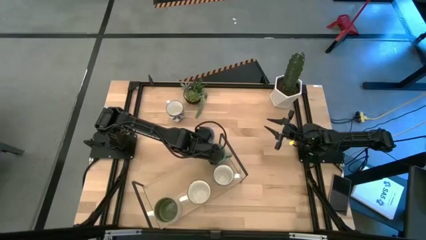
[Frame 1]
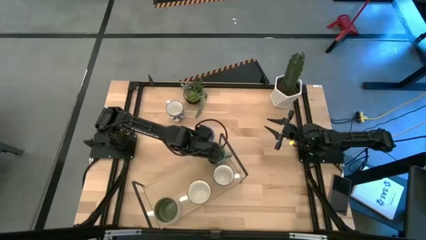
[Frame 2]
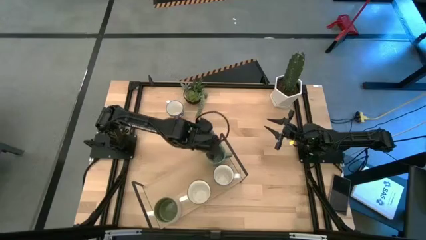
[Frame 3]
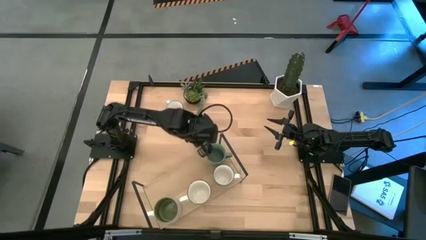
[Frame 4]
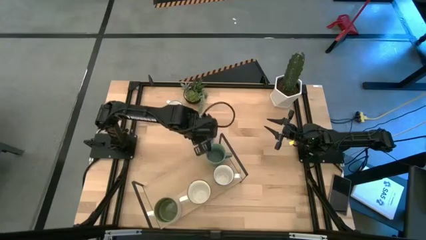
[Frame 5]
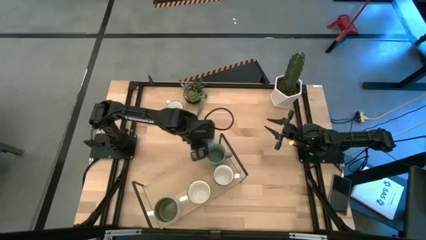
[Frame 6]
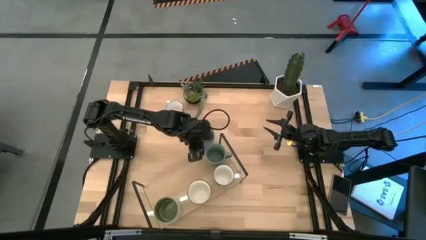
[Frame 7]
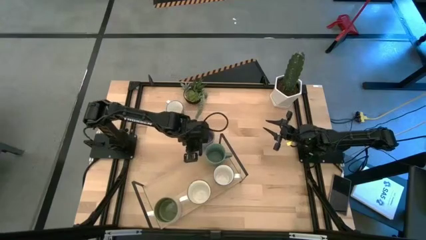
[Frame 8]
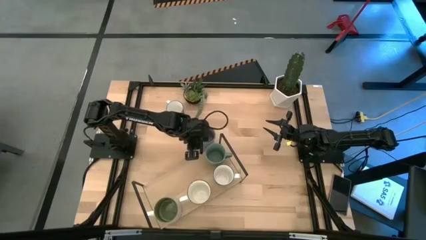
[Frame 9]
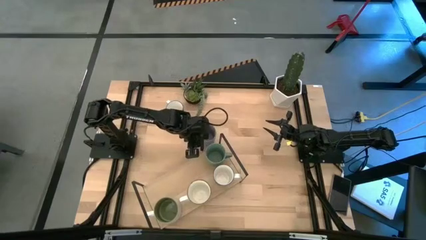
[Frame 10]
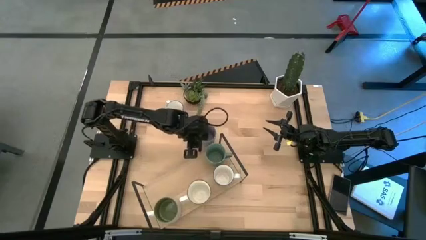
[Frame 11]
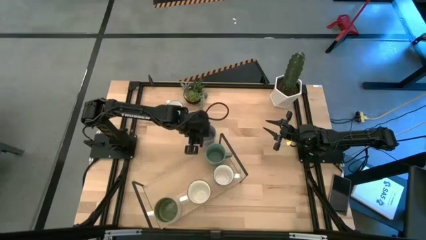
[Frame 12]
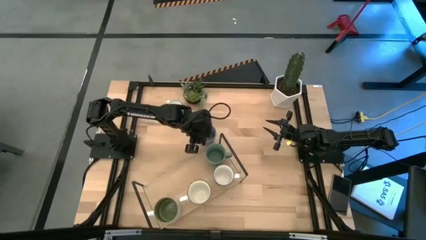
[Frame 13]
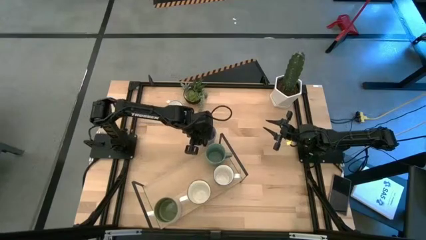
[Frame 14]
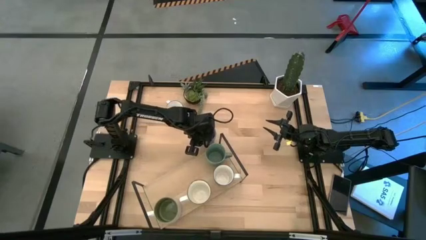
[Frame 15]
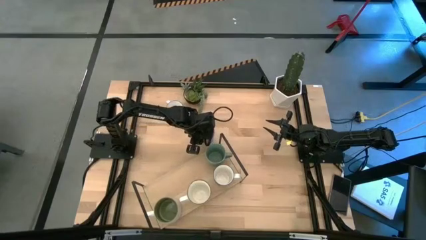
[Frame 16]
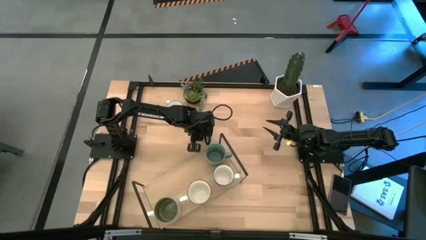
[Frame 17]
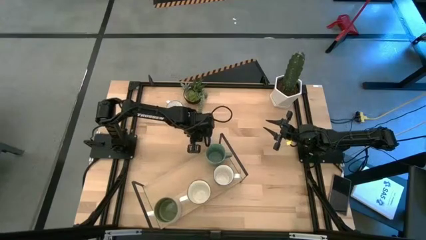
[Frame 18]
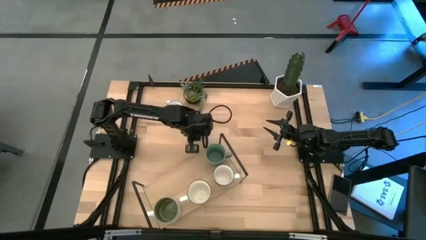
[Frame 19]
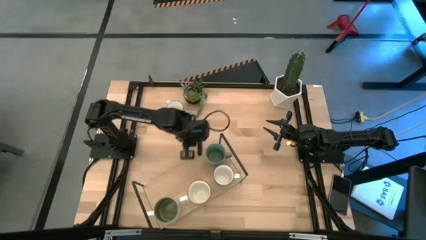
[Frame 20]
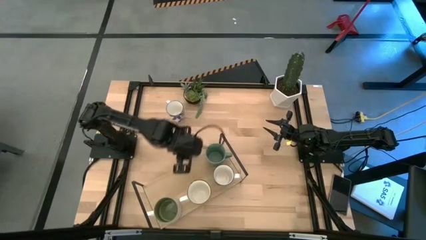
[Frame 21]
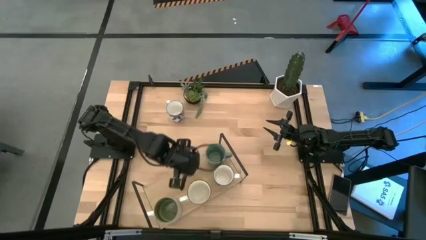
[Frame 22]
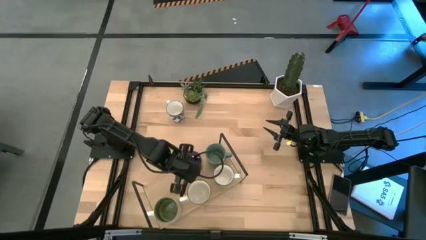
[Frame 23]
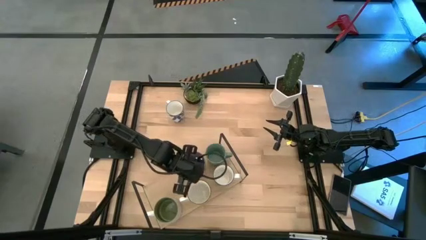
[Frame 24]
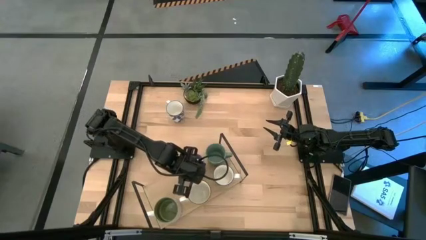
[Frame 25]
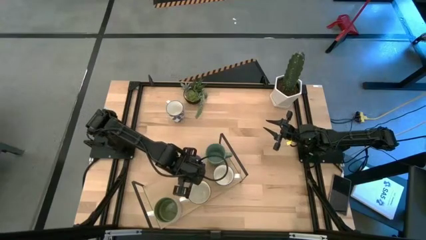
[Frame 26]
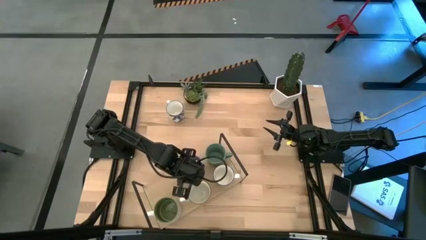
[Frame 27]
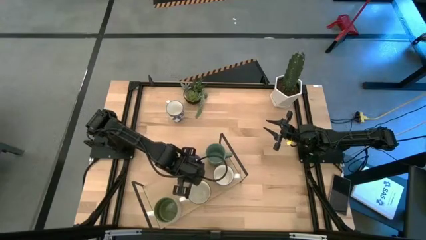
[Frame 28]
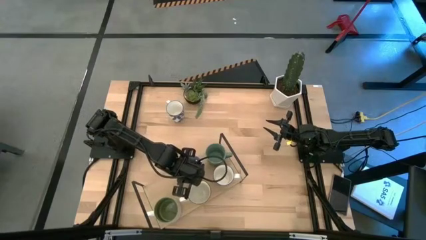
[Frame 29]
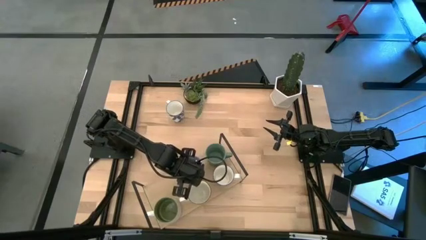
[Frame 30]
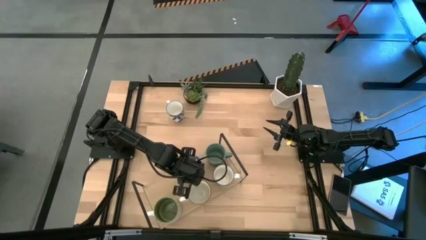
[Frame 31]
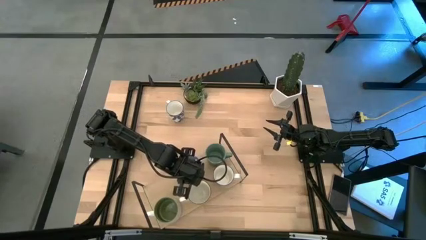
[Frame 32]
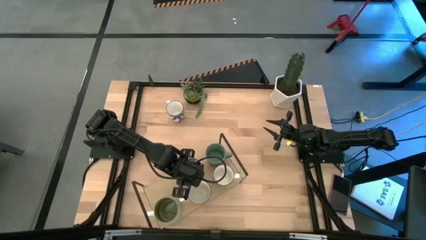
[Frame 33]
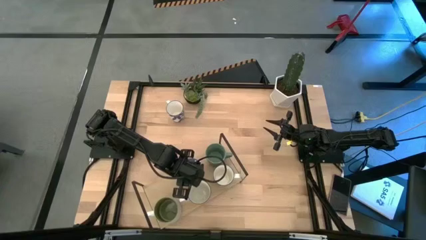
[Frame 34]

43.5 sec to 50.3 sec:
Task: Place coffee mugs
Put the blue mug on the shelf aligned with the green mug

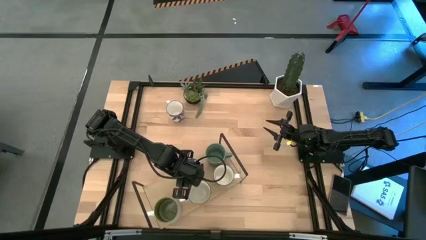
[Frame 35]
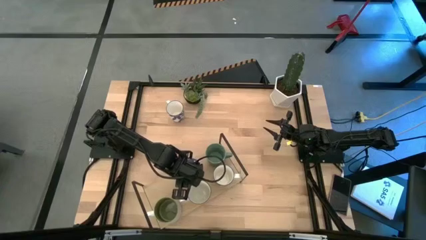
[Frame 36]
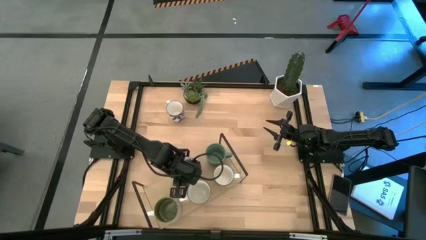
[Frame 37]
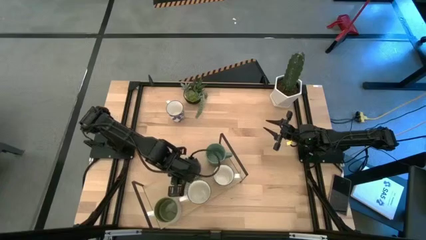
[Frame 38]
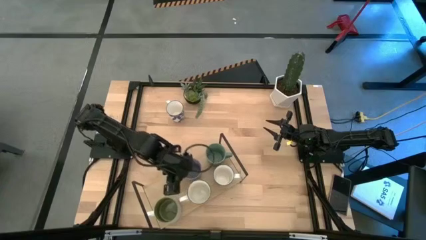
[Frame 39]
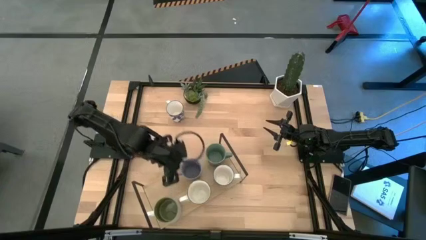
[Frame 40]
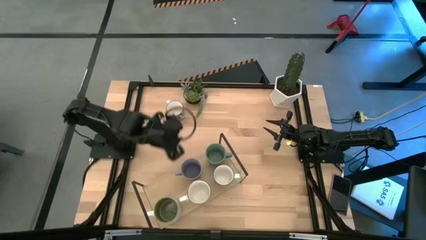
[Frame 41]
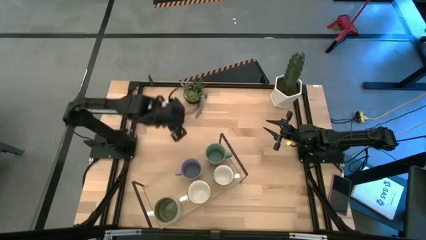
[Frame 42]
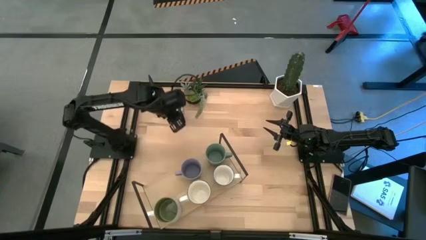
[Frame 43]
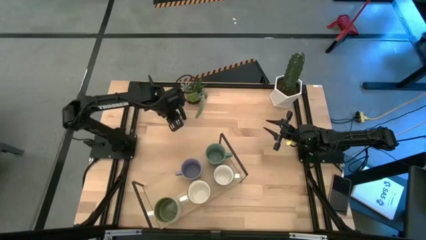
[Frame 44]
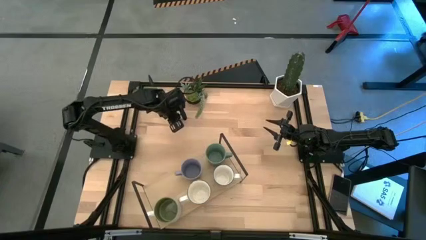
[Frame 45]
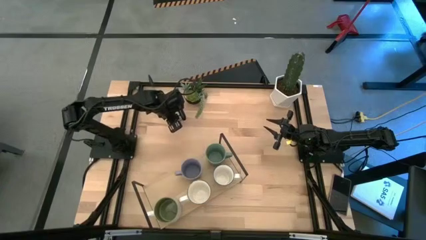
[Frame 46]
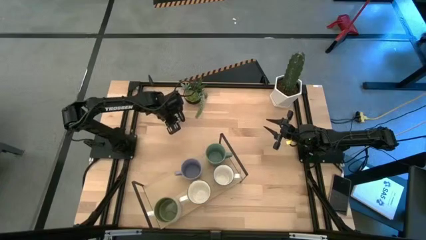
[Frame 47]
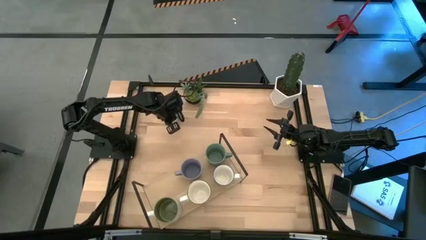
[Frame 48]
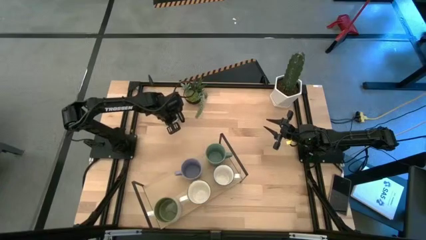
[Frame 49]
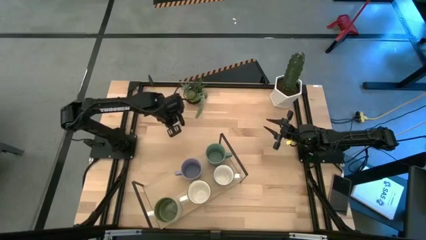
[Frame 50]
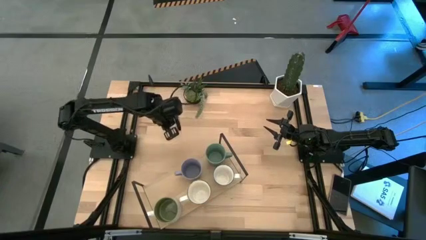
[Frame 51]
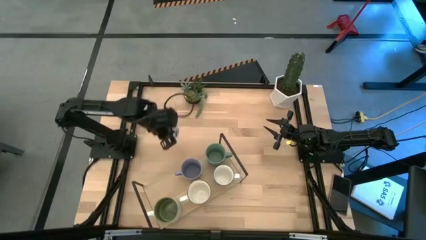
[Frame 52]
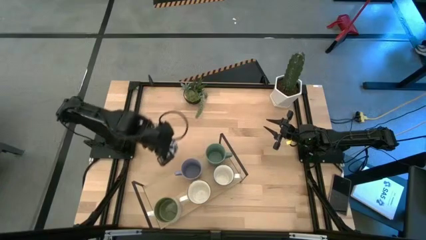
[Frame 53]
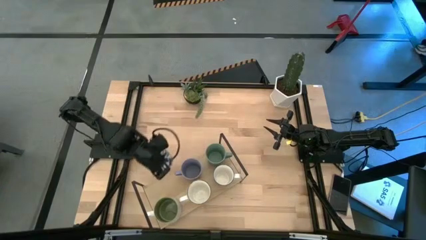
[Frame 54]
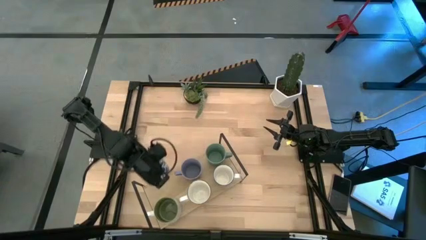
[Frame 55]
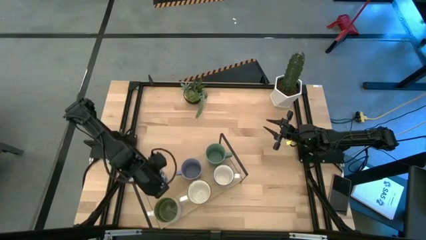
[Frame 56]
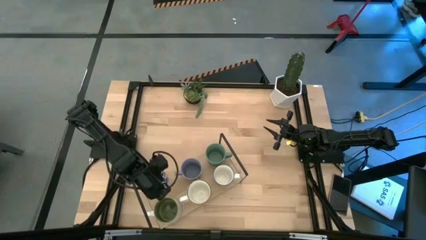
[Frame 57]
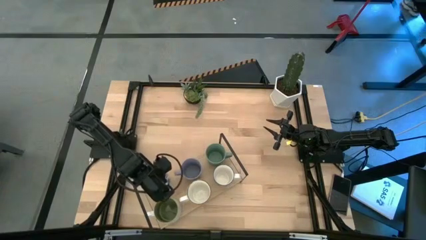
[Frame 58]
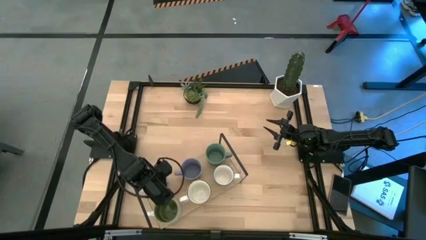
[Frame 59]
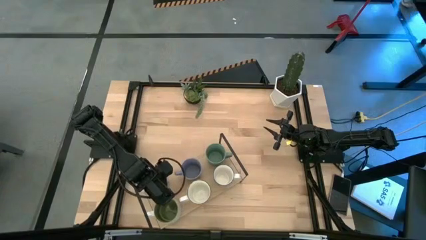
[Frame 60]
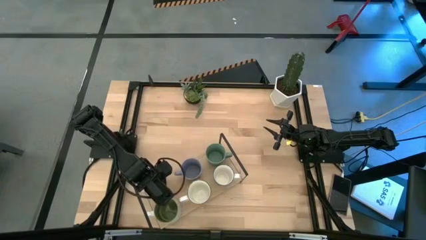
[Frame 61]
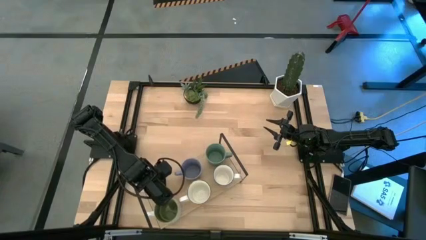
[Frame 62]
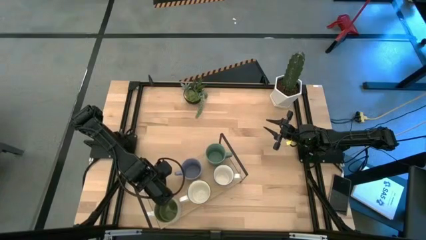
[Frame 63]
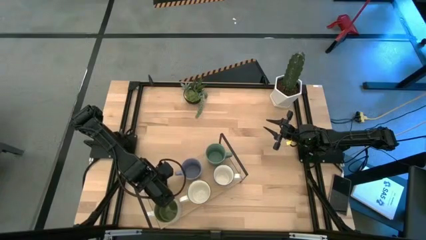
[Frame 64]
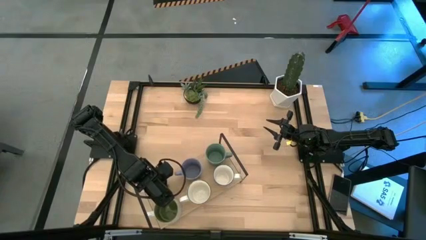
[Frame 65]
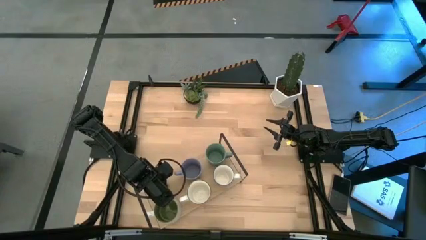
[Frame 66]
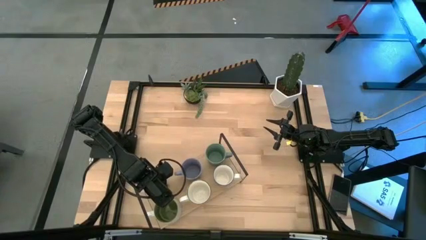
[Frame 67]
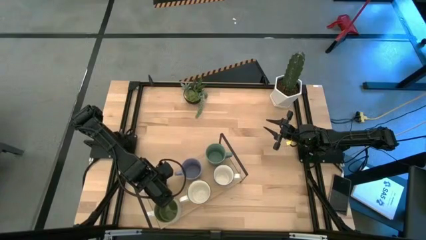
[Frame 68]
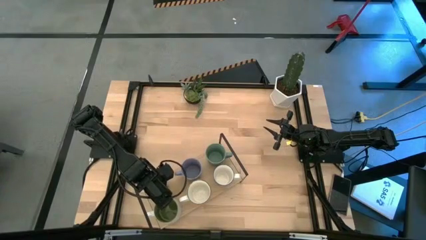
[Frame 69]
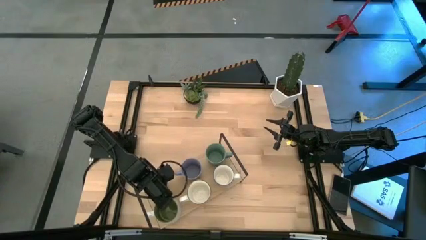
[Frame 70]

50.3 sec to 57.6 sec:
Put the white blue patterned mug at the top left corner of the shelf

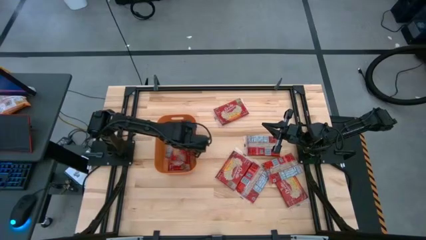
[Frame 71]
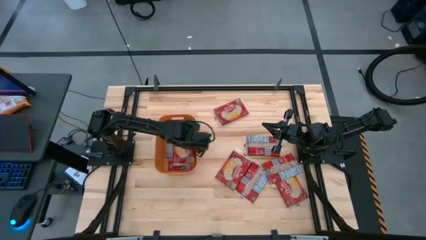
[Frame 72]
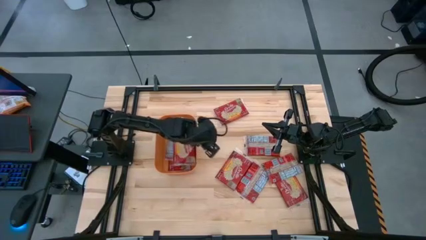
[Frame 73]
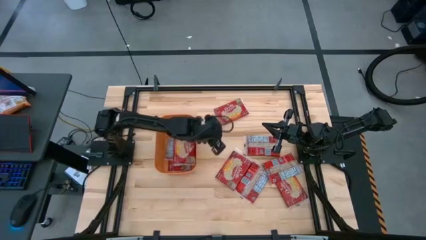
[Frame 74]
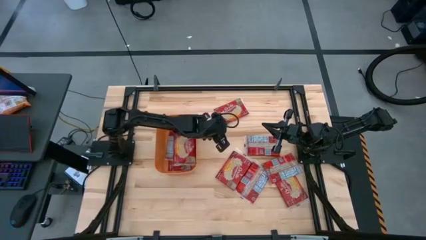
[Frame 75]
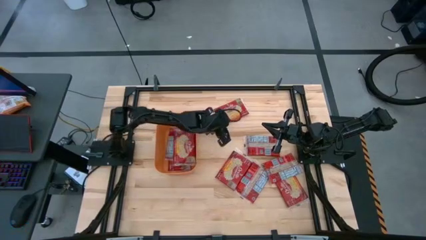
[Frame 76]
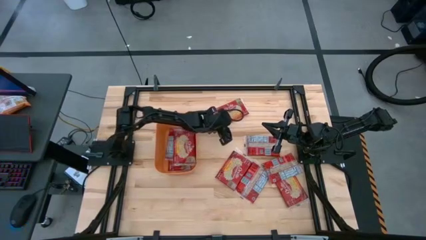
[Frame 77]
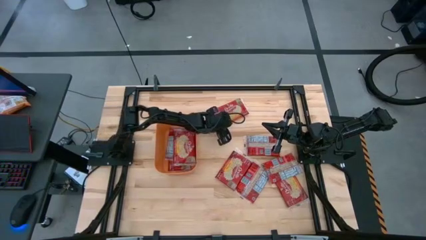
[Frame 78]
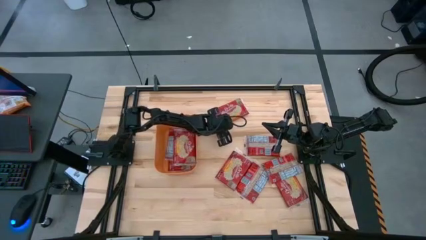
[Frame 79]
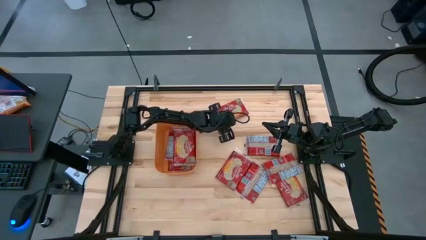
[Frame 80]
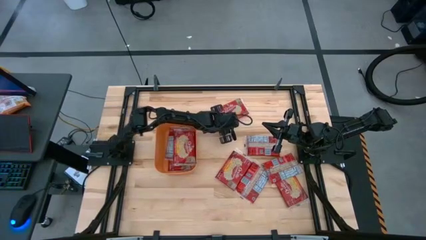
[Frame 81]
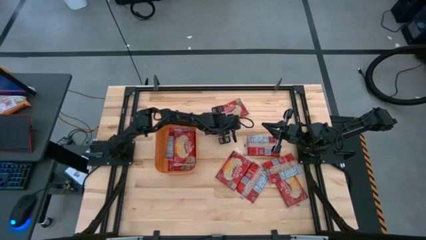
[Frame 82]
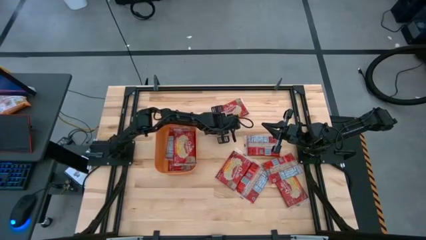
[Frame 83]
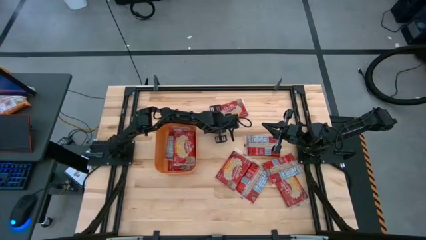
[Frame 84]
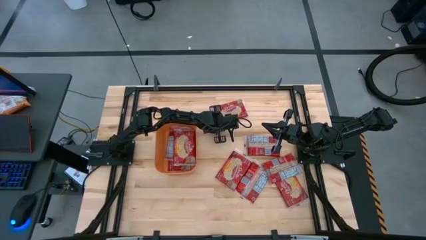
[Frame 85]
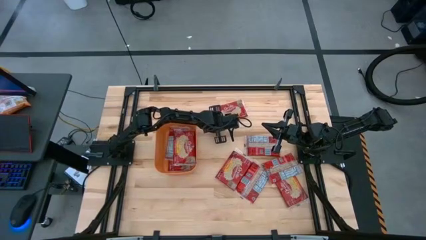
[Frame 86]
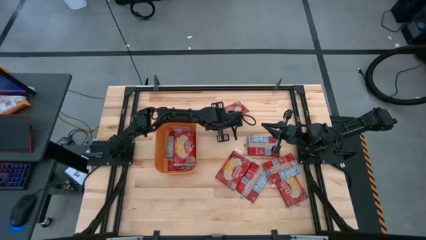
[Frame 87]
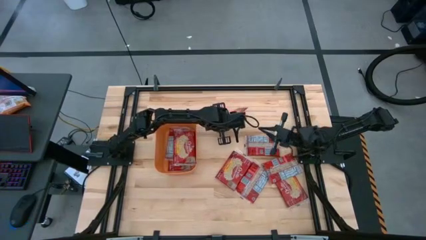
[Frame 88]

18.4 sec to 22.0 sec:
Task: Sort popcorn bags into baskets
Put the popcorn bag into the orange bin
